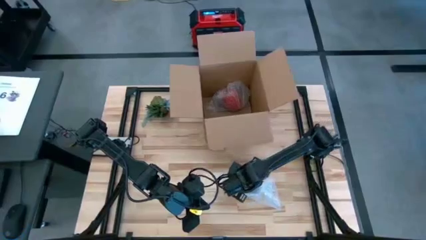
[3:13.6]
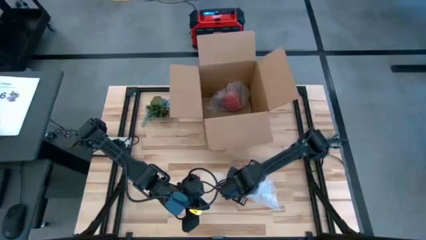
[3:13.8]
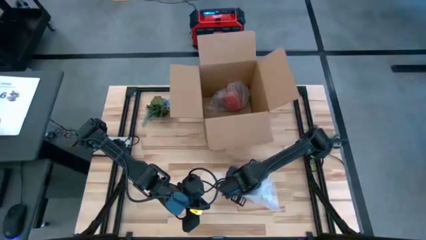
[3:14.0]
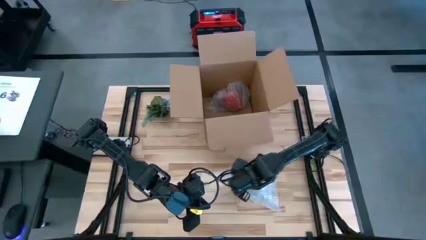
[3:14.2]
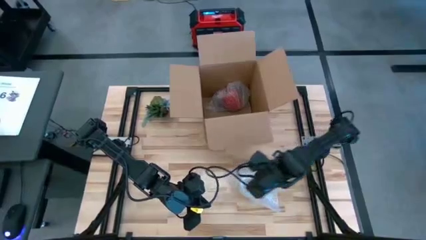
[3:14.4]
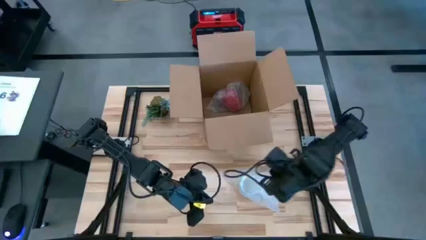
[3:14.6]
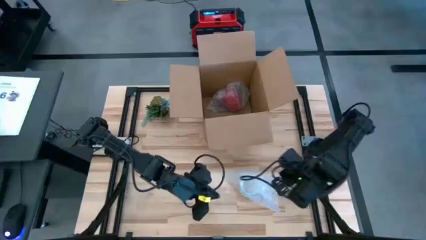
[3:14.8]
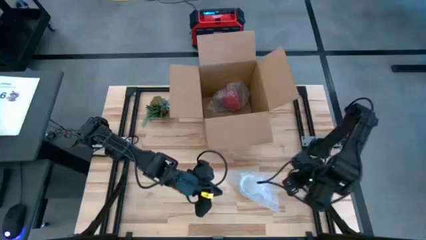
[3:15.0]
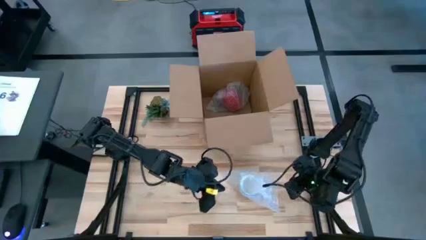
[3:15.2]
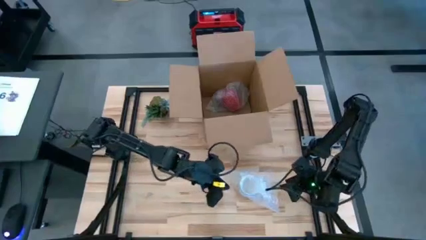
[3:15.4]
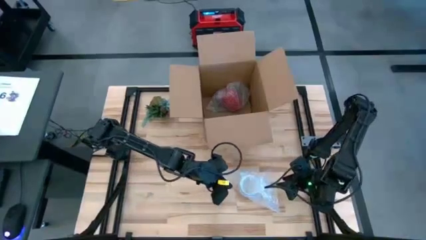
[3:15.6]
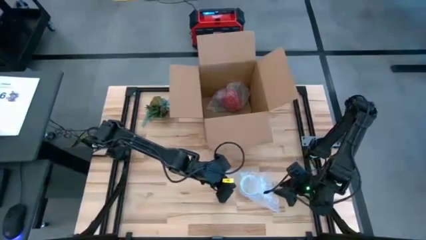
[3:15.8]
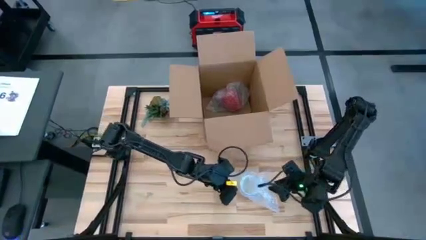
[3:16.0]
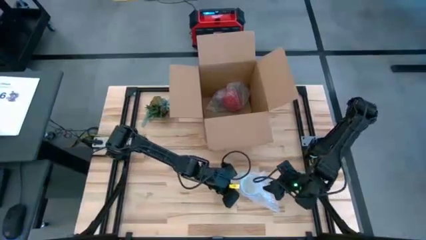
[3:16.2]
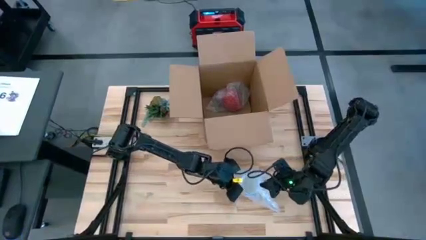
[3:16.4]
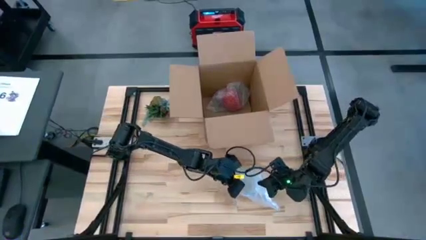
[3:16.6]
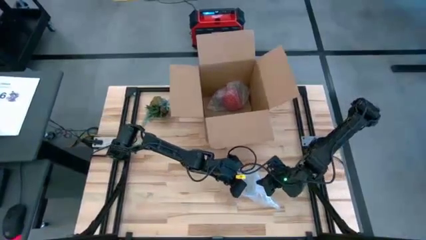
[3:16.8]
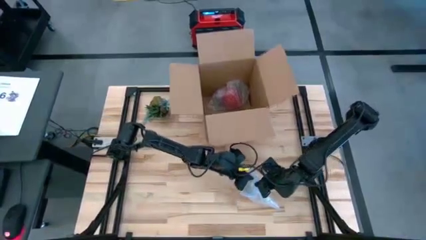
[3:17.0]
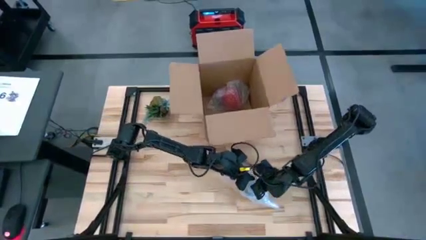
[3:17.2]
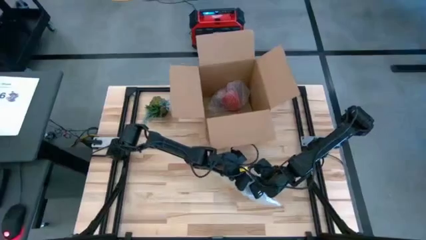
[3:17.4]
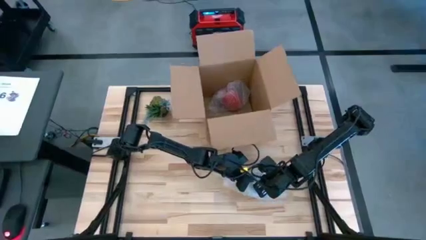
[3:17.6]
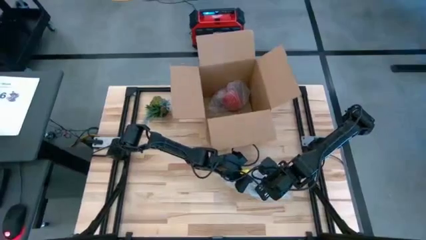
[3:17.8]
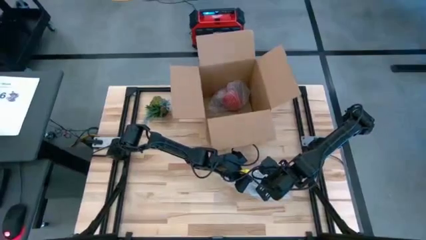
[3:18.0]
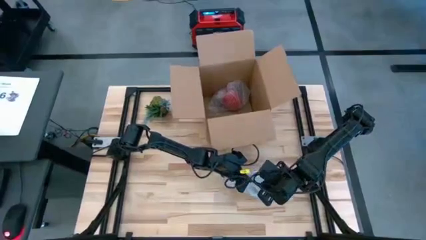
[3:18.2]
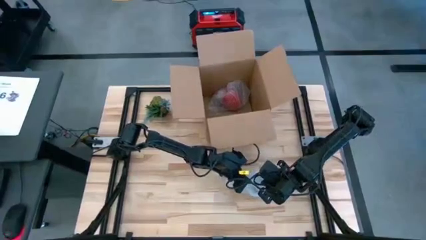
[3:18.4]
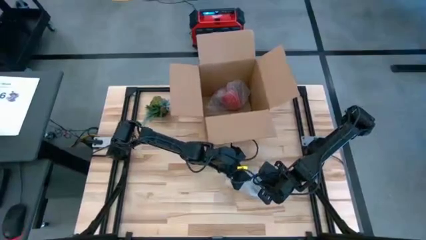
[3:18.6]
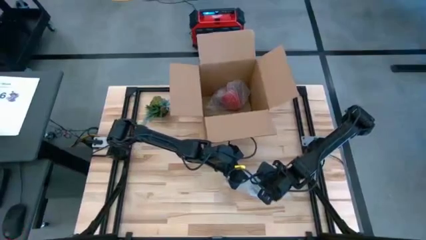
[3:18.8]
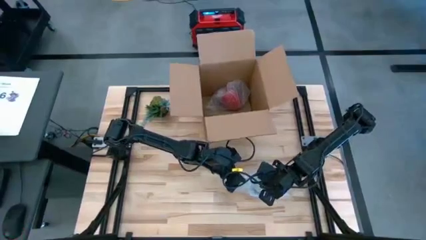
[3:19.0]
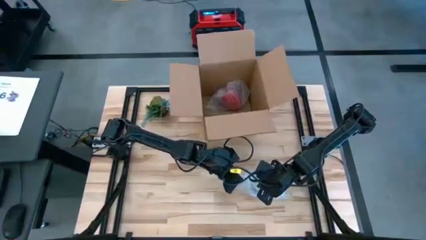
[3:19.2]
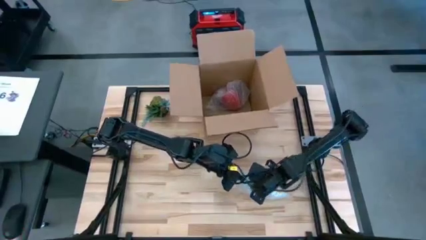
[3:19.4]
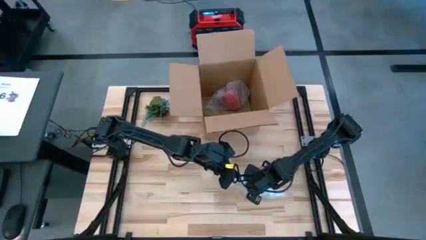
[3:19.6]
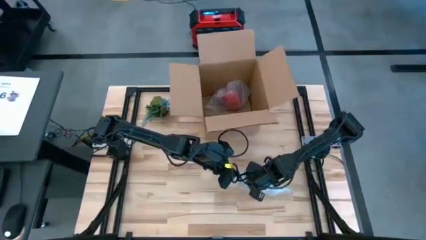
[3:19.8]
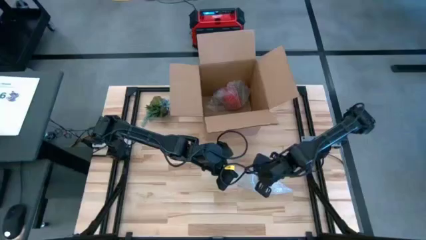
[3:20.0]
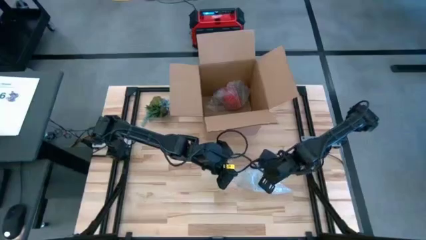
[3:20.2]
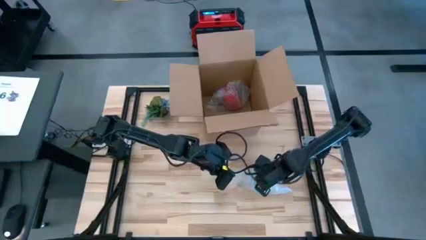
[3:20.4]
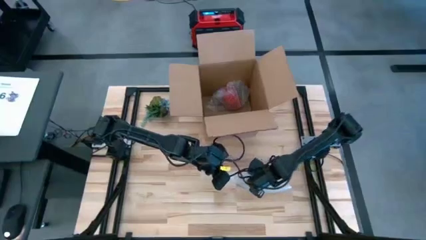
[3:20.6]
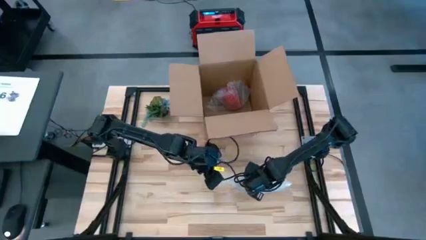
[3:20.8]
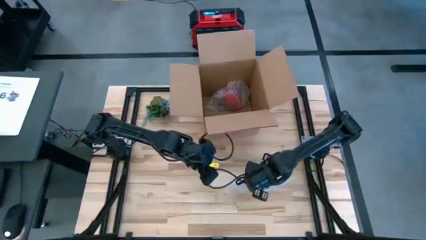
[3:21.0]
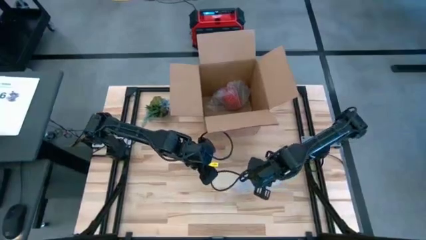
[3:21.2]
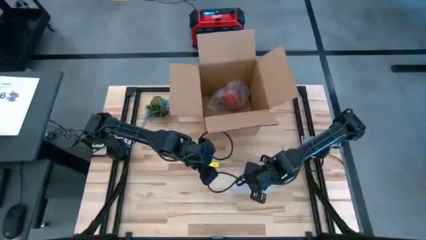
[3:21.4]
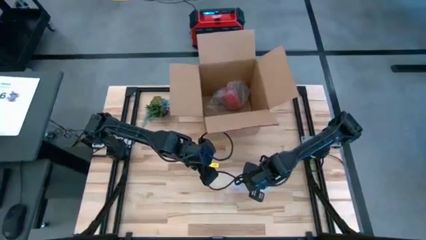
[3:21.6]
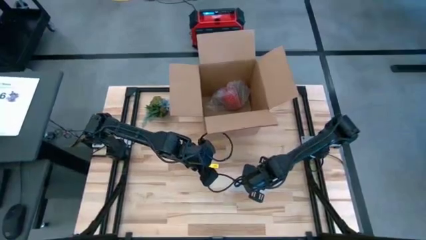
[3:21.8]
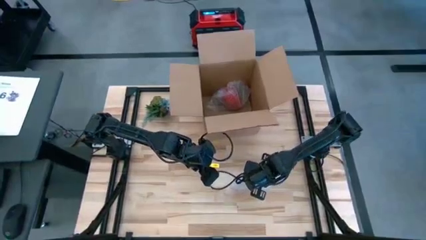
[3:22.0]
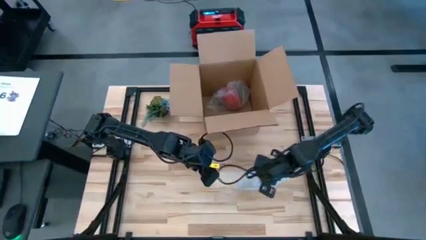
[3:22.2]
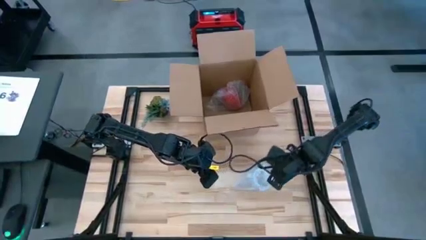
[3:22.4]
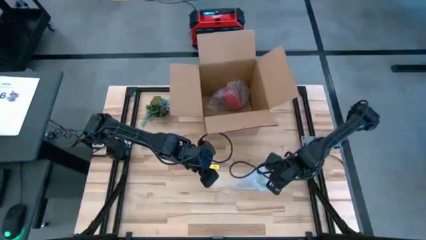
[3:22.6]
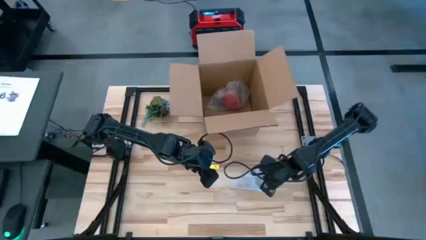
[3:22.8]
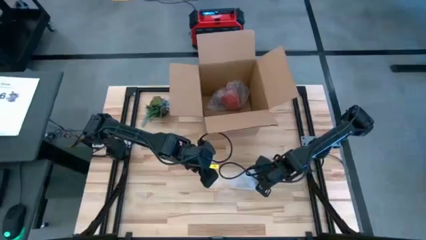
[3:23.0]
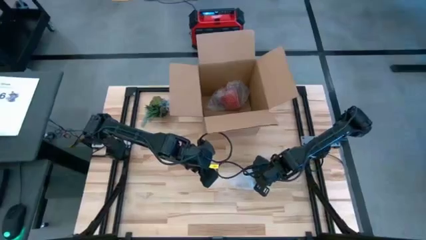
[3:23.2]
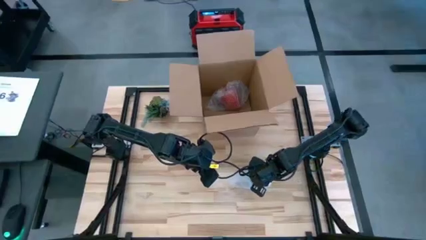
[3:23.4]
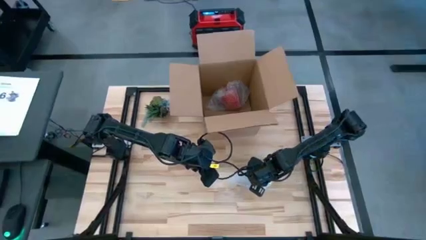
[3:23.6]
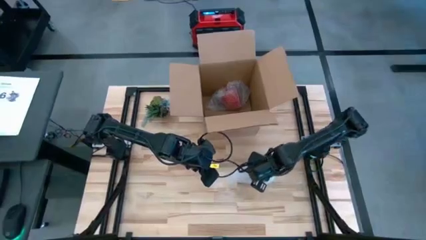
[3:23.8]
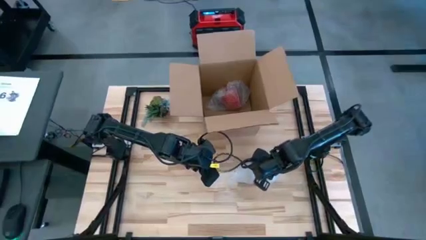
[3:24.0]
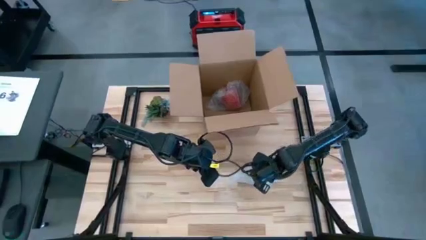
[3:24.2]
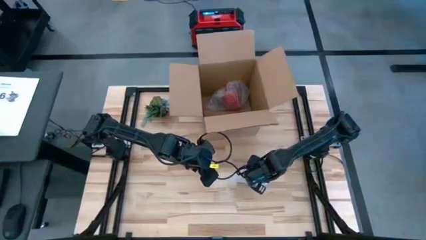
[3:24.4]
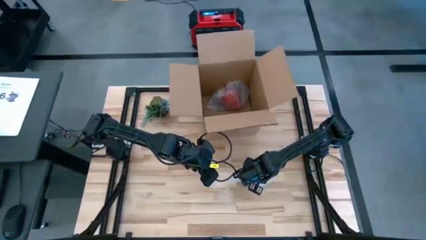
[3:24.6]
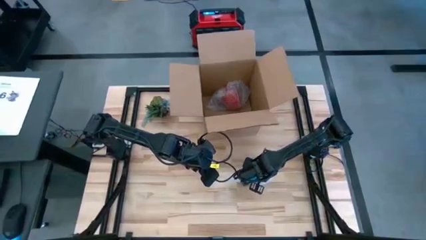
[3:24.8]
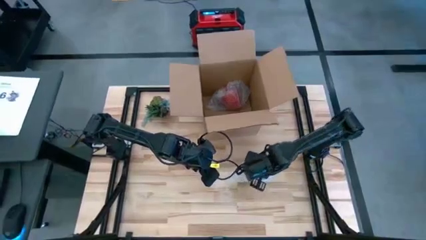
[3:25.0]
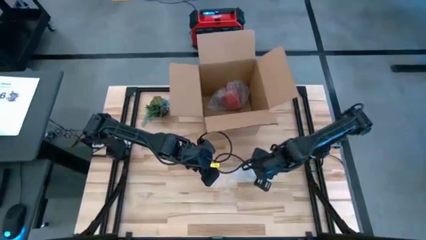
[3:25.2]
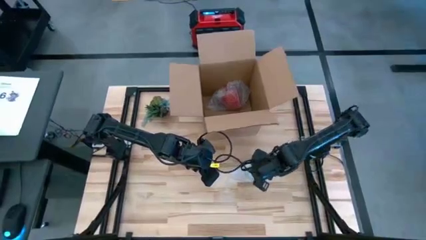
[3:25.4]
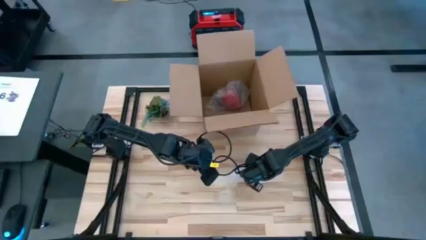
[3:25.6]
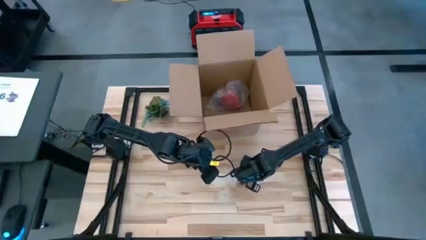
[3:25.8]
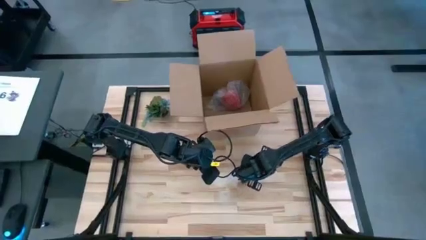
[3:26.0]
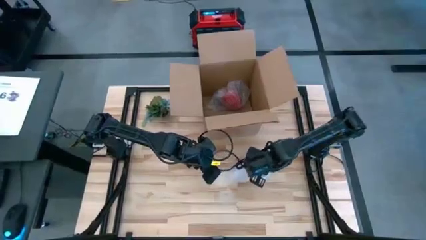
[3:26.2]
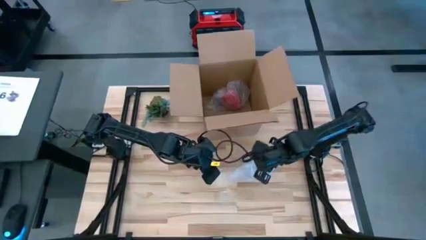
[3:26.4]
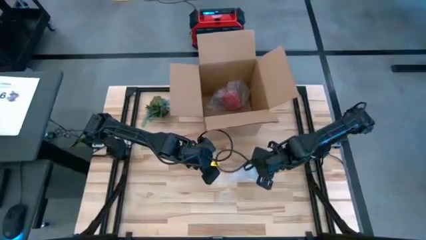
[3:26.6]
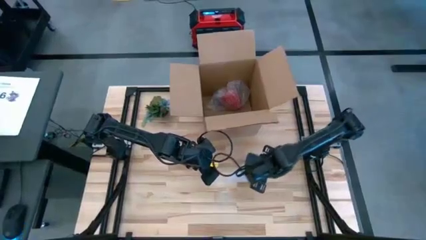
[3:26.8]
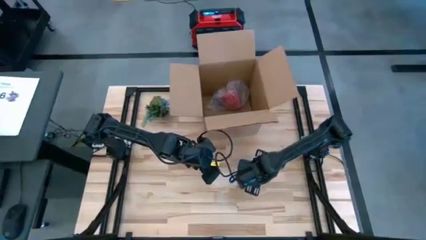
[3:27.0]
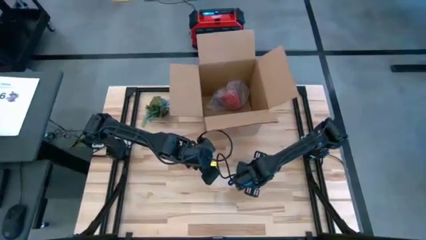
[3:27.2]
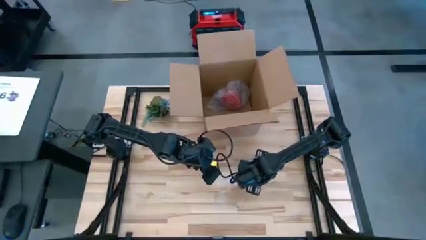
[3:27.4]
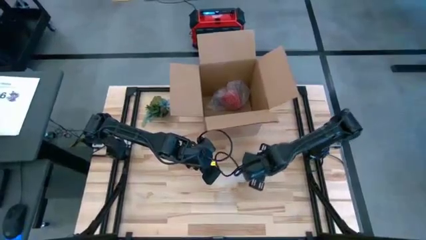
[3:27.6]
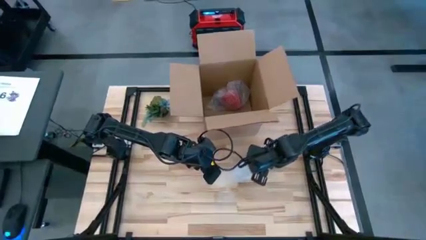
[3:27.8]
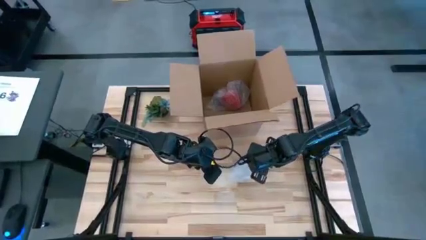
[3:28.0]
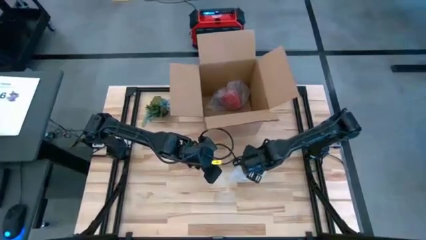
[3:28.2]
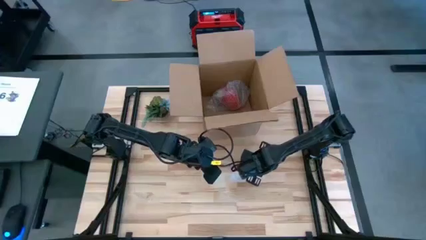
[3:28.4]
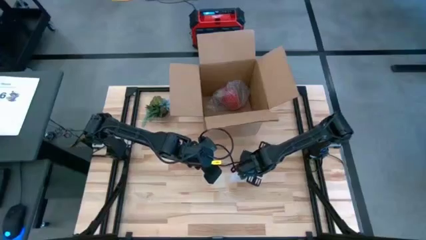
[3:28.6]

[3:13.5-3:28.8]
Task: wrap mug
Wrap the white mug with bubble wrap

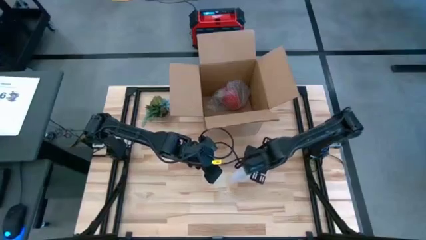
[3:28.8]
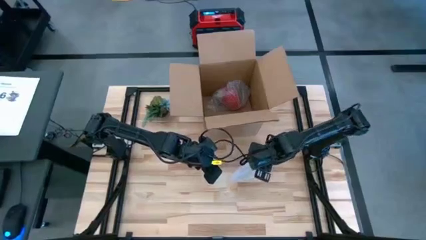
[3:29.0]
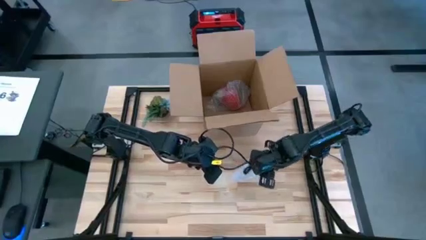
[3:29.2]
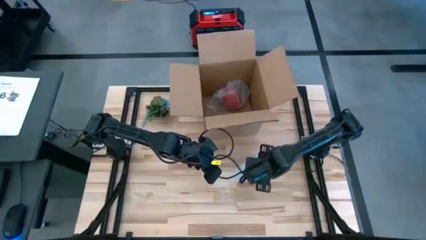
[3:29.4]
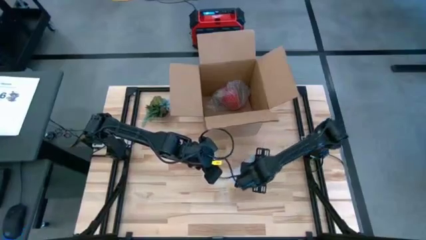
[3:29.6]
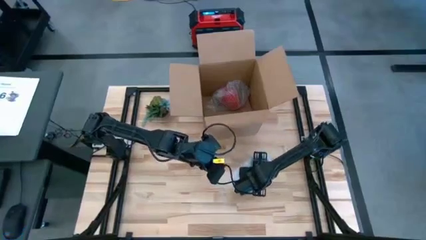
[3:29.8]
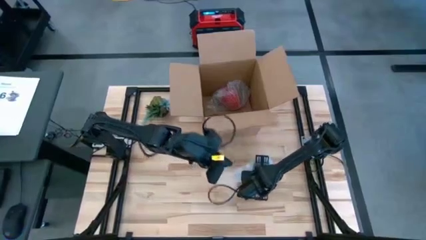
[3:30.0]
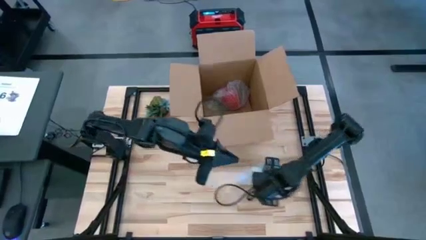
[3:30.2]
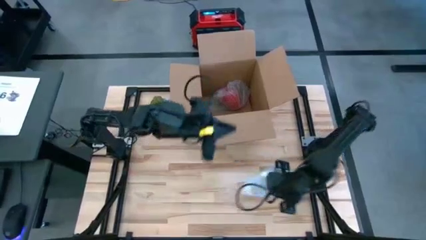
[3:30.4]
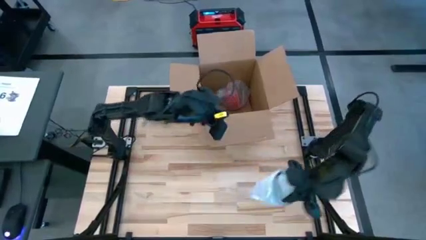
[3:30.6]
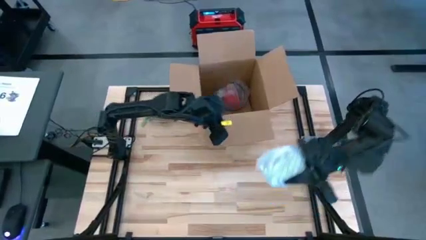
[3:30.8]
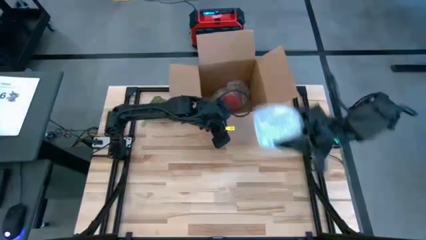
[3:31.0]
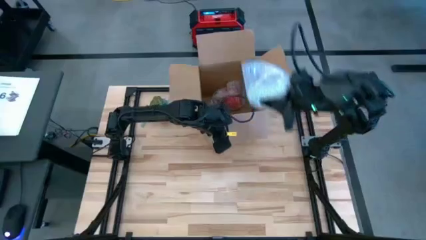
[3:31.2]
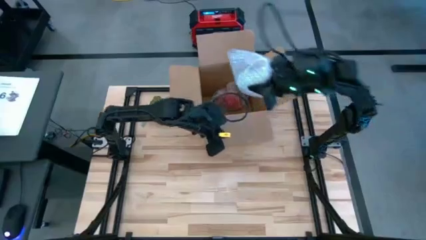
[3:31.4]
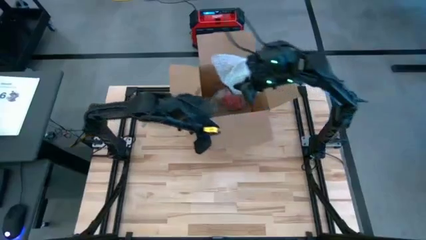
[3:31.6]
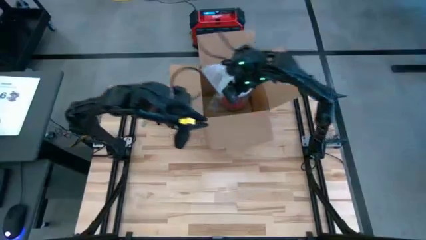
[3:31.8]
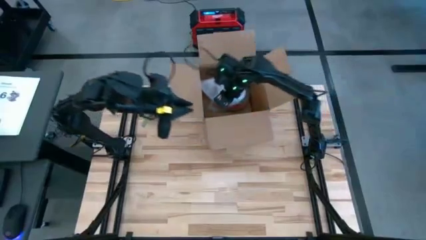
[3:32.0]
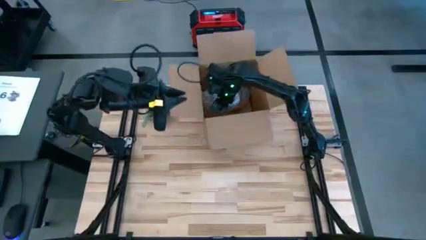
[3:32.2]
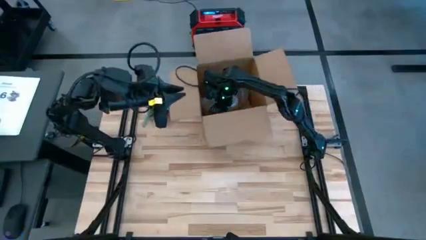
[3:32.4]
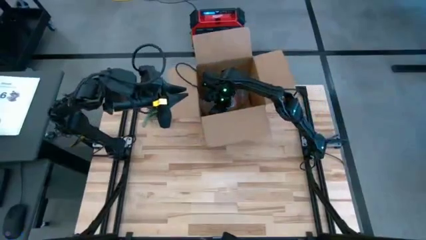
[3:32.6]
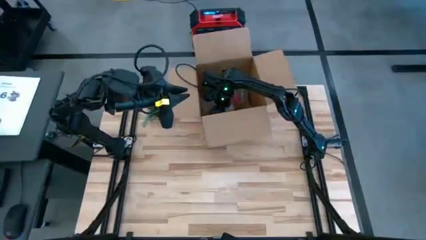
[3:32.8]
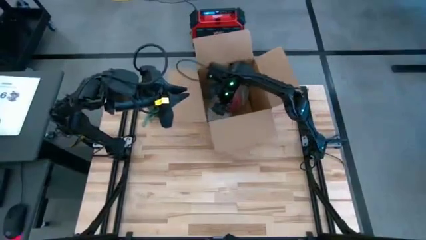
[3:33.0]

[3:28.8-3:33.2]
Put the wrapped white mug into the cardboard box
